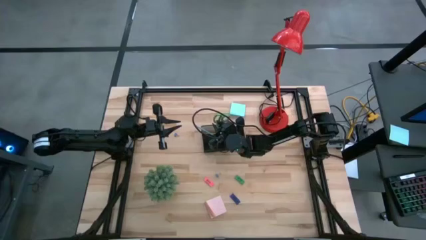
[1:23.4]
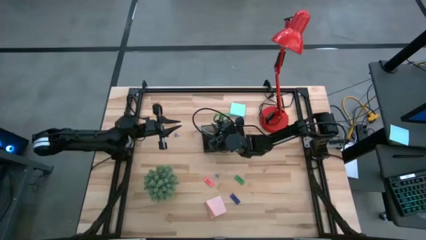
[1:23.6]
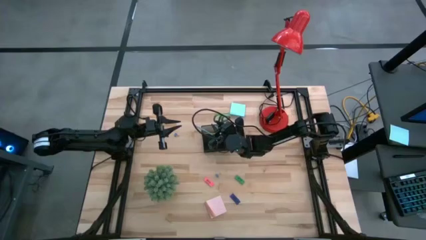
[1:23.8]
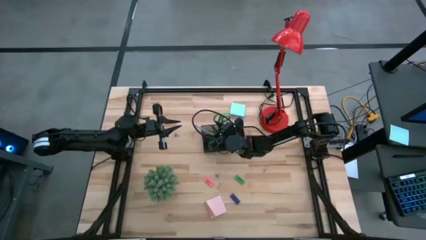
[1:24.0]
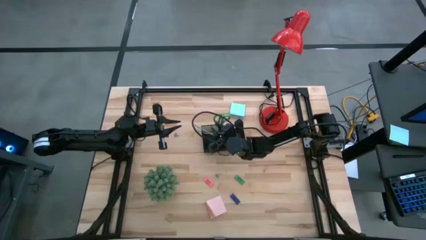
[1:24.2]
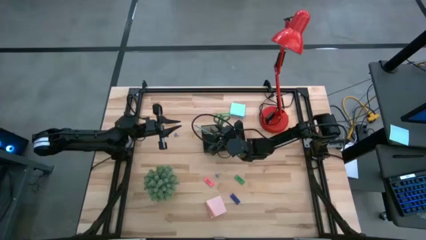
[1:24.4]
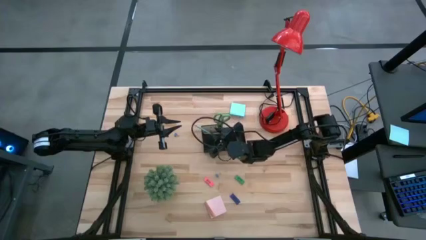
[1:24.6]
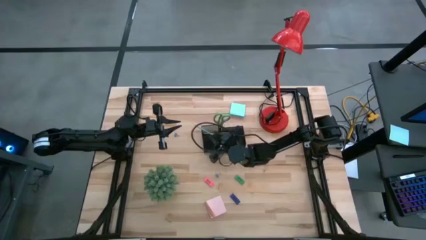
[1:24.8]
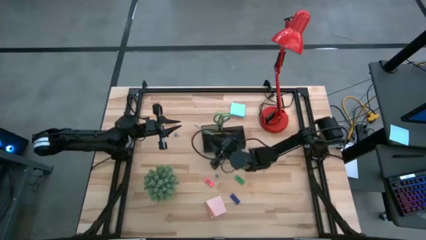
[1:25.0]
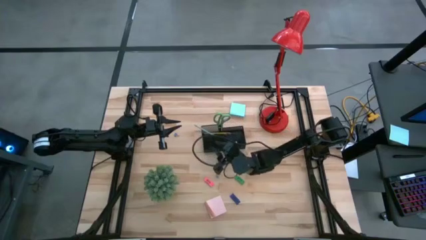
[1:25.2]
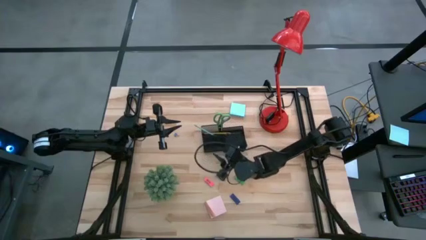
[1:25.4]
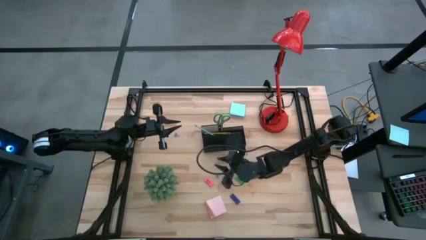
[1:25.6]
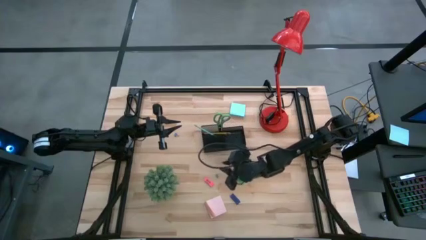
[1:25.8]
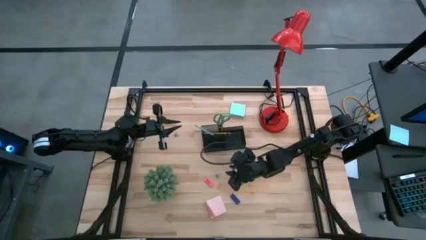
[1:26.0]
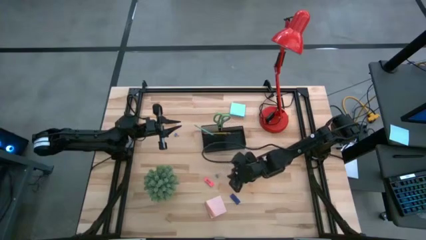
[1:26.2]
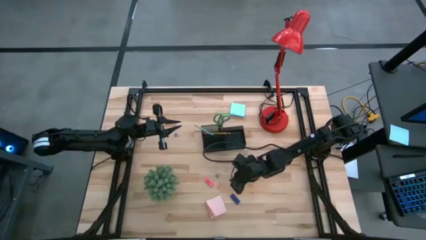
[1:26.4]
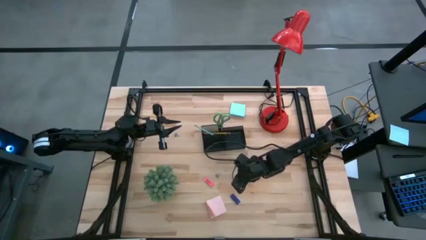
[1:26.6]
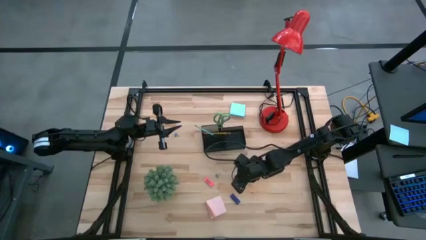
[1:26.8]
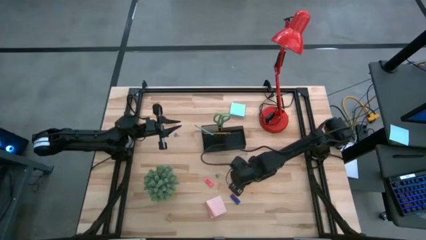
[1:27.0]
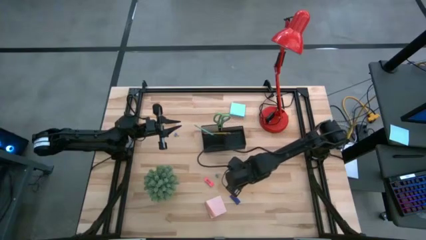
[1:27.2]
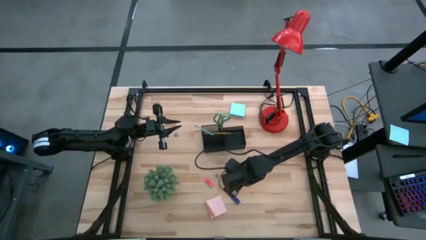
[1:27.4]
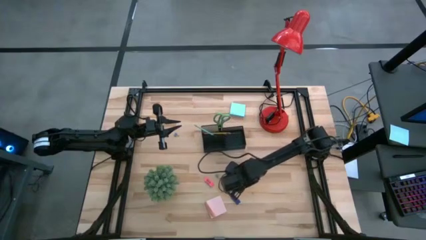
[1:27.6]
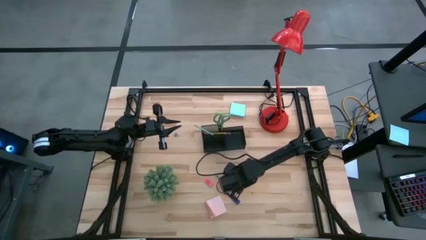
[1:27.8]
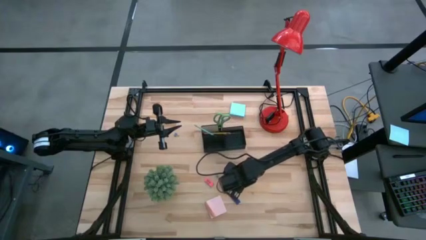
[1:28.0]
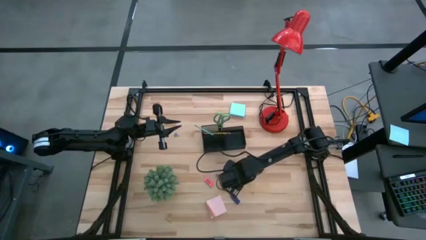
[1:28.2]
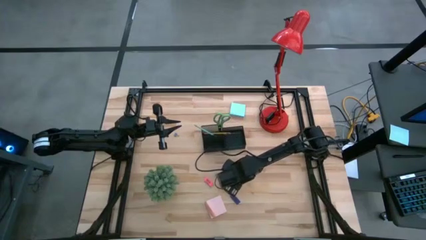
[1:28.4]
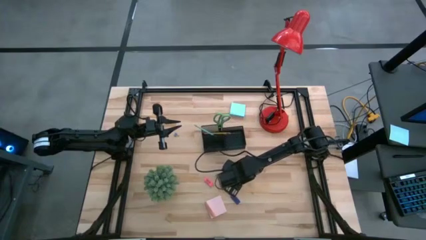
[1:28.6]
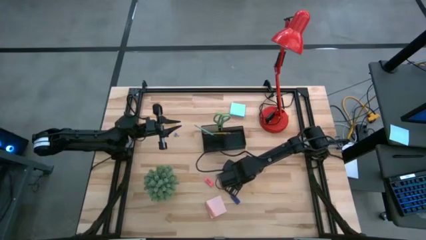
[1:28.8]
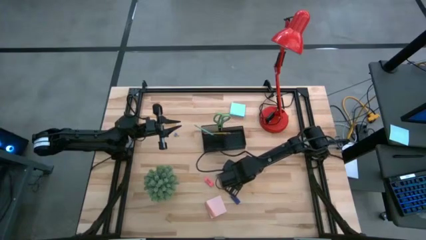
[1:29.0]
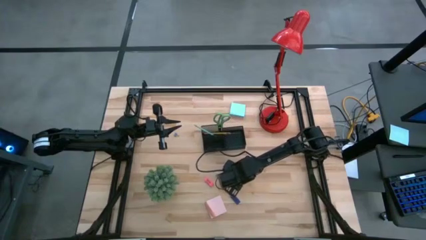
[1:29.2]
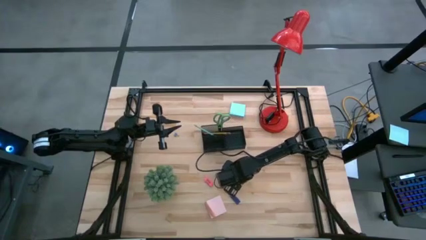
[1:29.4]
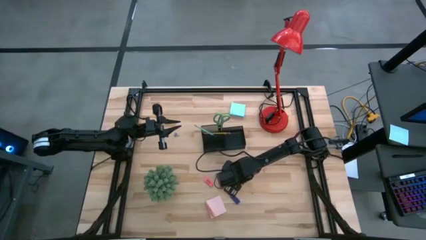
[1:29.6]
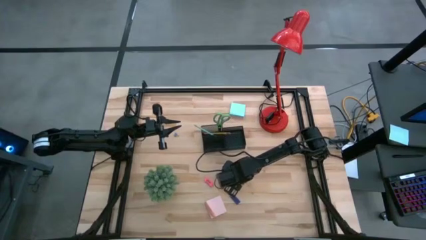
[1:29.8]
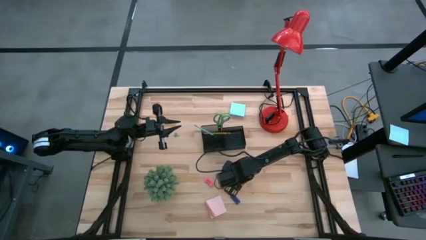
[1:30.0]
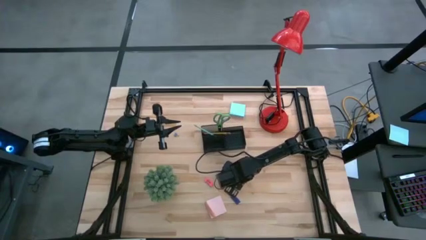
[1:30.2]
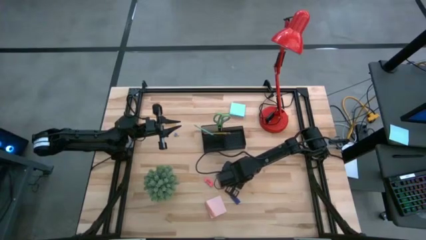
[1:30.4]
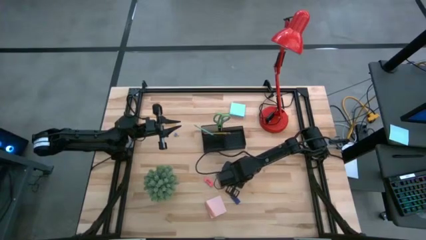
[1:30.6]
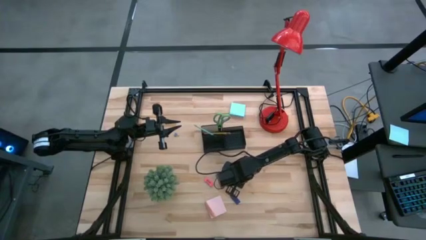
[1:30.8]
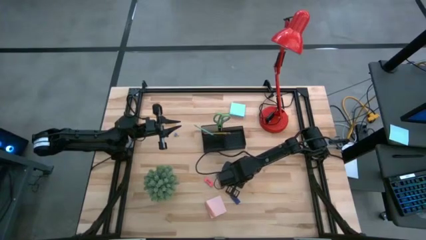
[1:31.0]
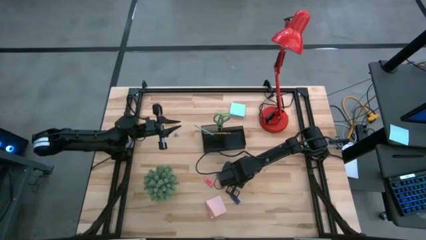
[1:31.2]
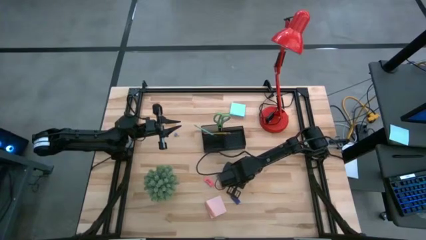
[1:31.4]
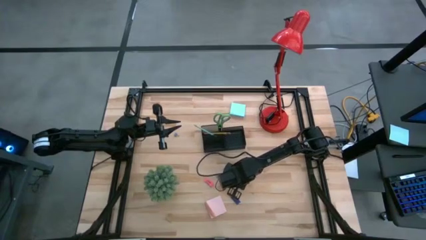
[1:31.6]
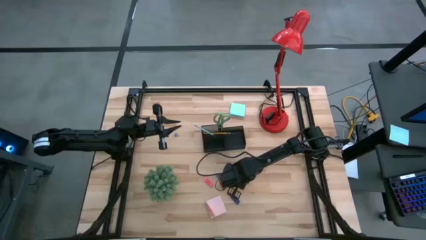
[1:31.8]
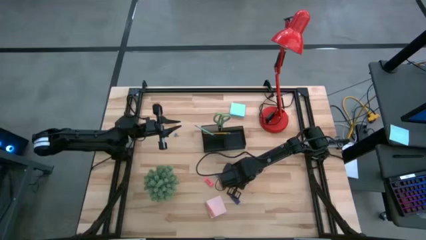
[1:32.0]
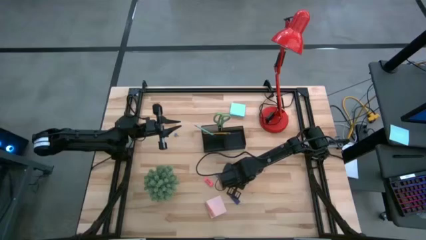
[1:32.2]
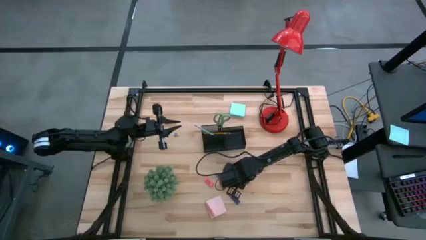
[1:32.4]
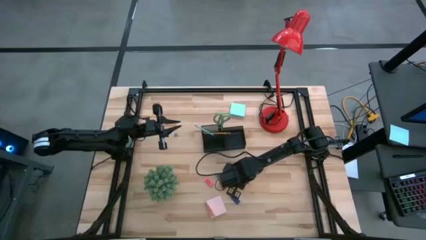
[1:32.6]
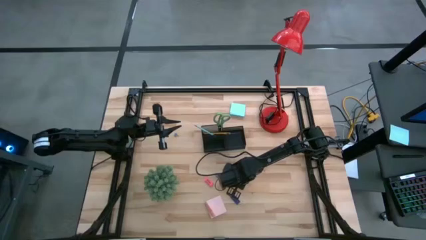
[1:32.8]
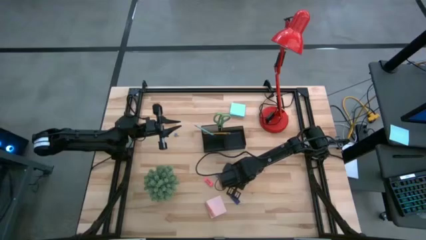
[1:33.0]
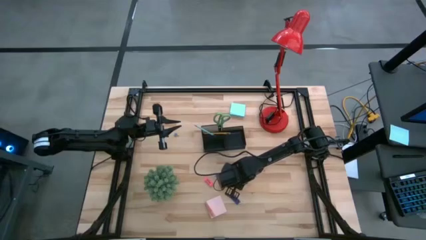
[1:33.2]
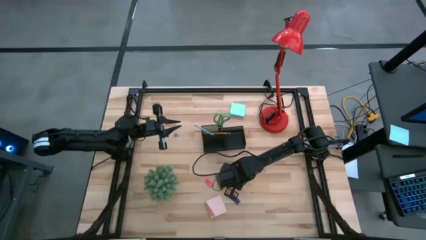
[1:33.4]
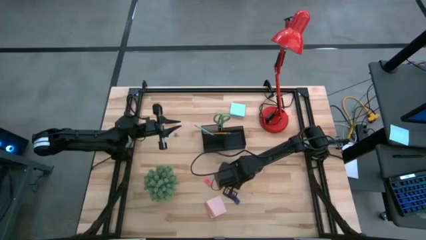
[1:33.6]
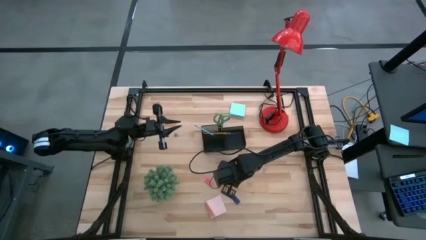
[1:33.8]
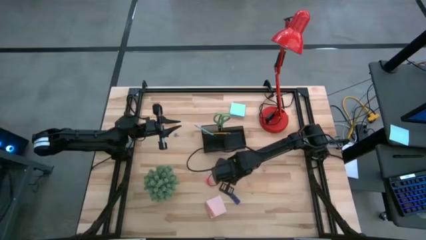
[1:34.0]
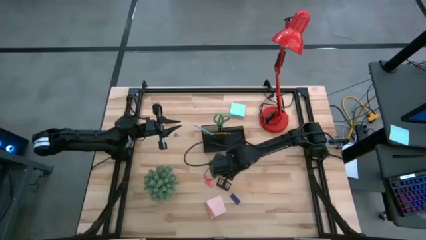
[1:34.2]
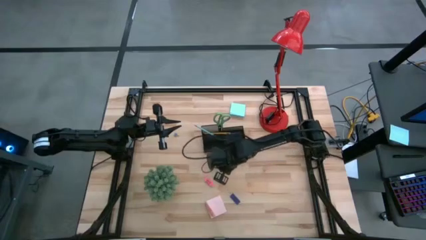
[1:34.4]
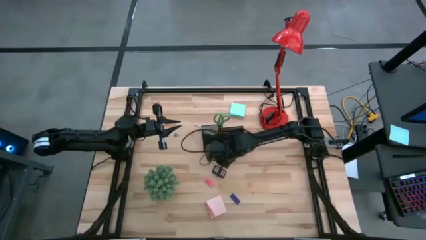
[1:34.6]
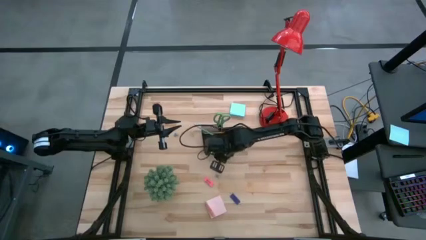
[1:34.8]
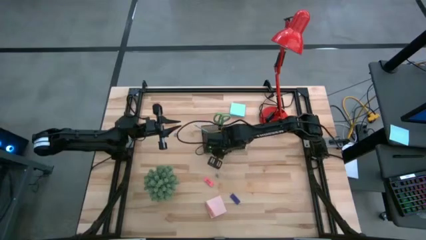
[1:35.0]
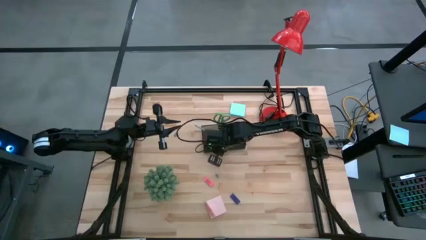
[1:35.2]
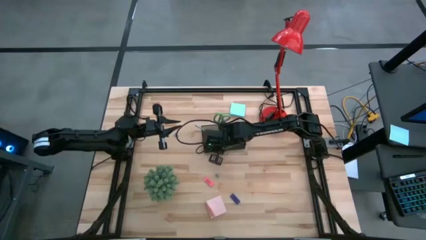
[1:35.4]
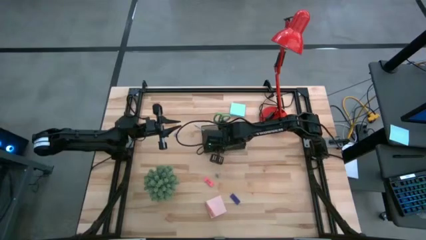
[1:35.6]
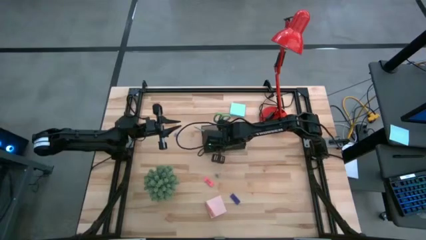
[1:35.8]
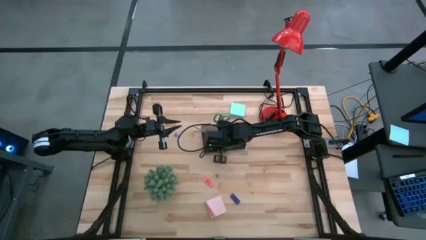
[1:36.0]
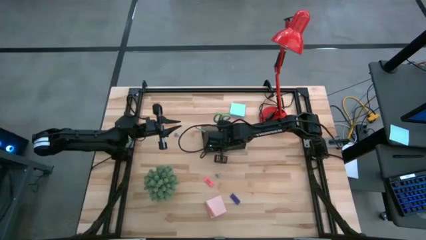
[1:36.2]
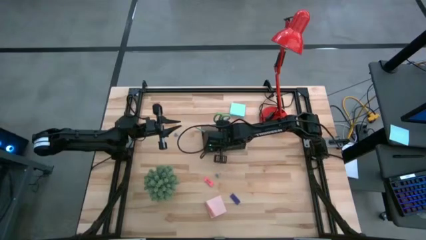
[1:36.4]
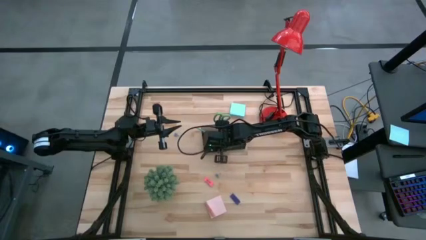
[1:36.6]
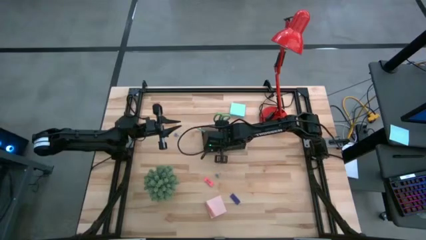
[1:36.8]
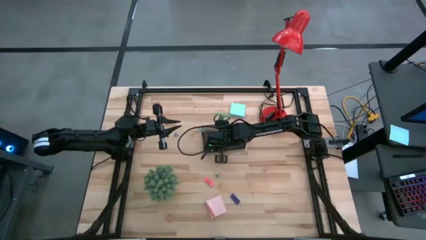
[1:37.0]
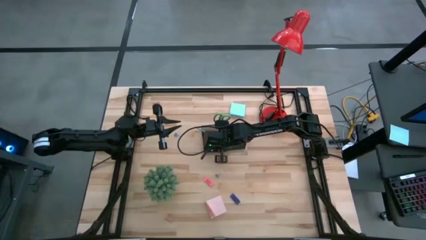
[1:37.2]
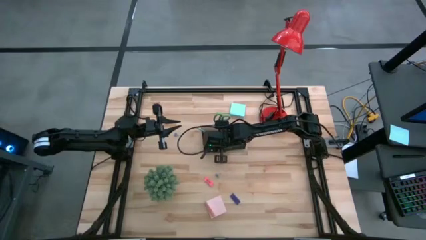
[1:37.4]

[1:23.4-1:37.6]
Task: Pick and place office supplies into organizer
Put the green eraser into the black desk organizer
